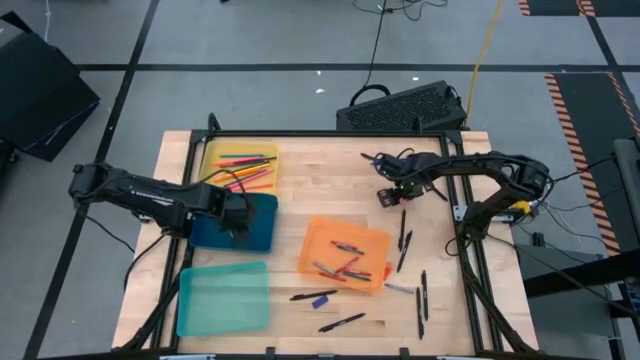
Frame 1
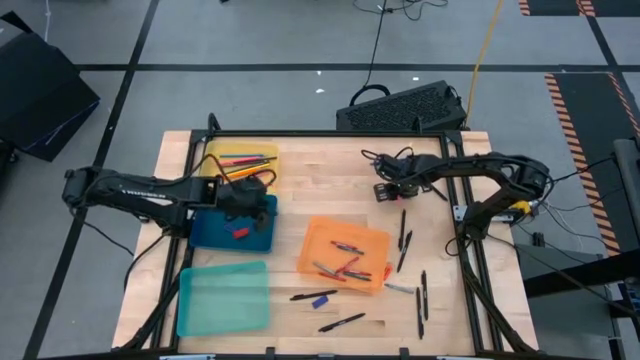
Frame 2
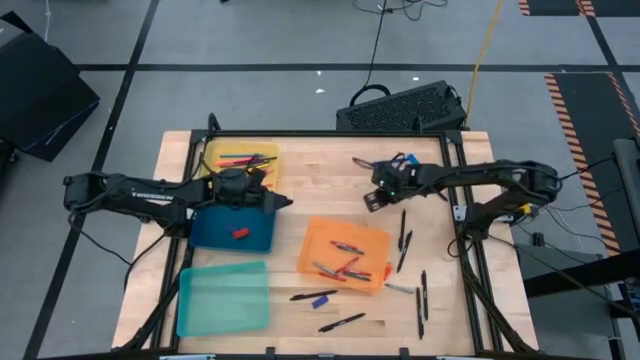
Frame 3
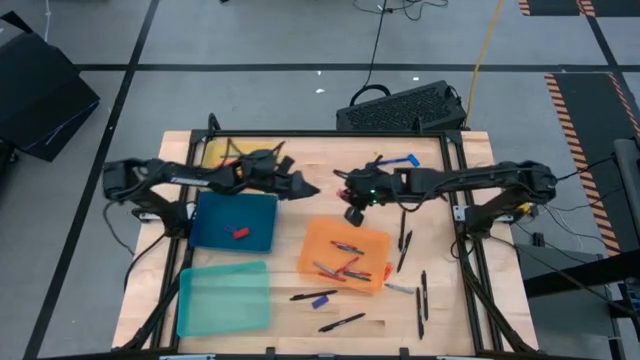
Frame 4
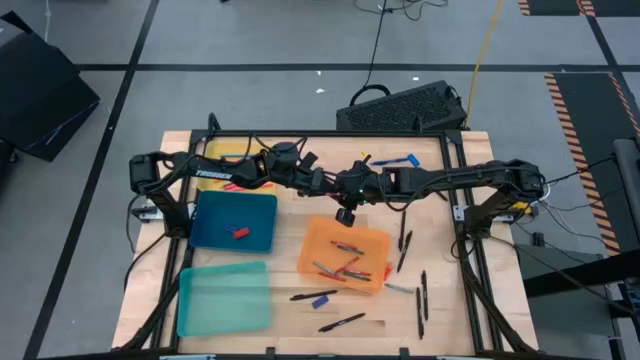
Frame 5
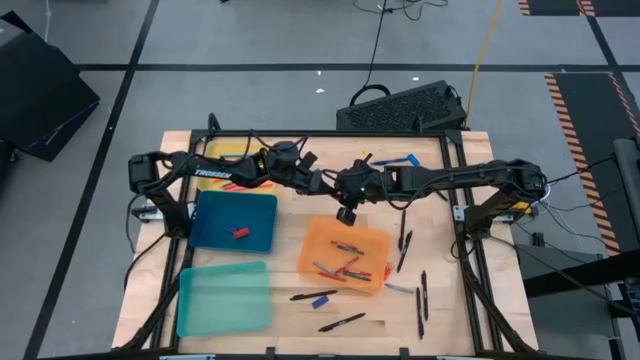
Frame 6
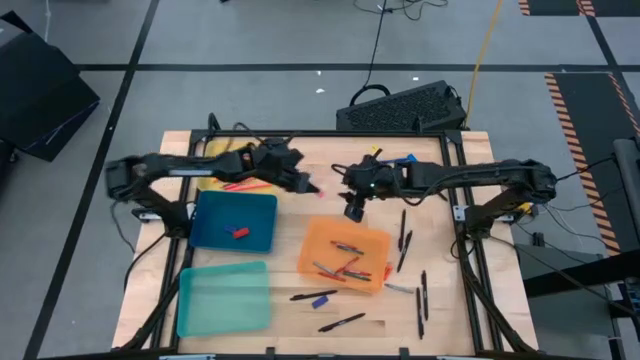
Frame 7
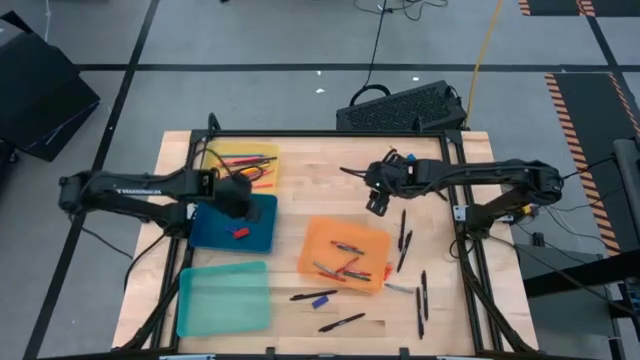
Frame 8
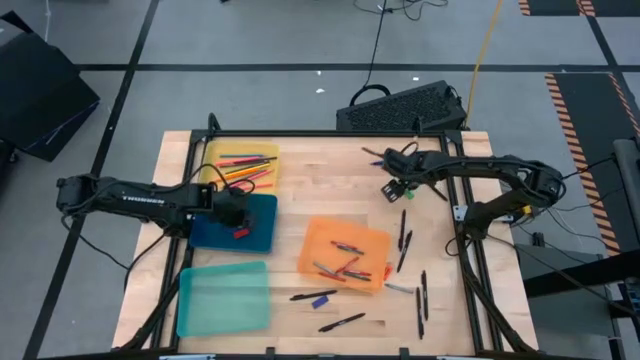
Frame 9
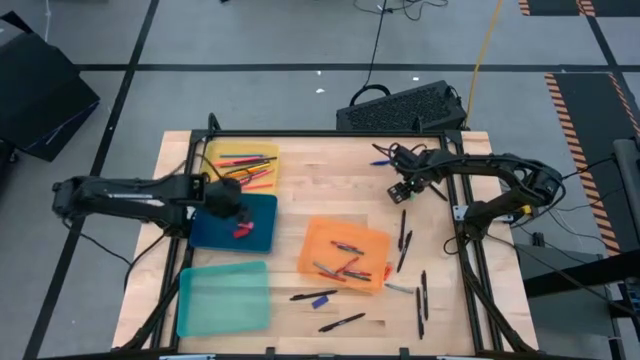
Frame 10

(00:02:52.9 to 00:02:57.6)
Task: Sort crayons/erasers/pens/pencils in bins
Put the pink eraser into the blue bin

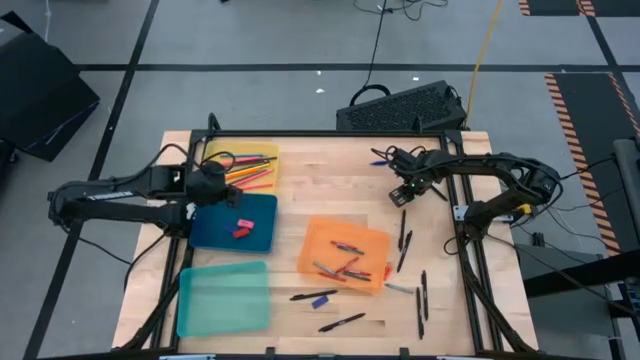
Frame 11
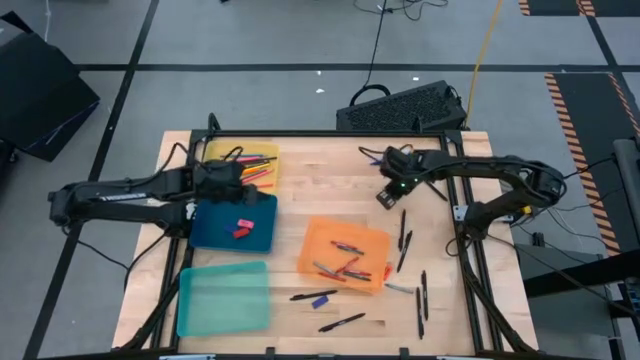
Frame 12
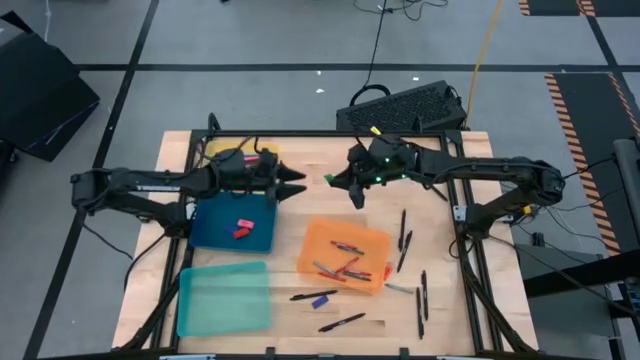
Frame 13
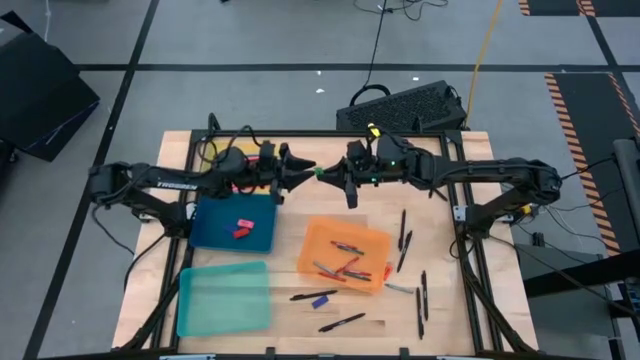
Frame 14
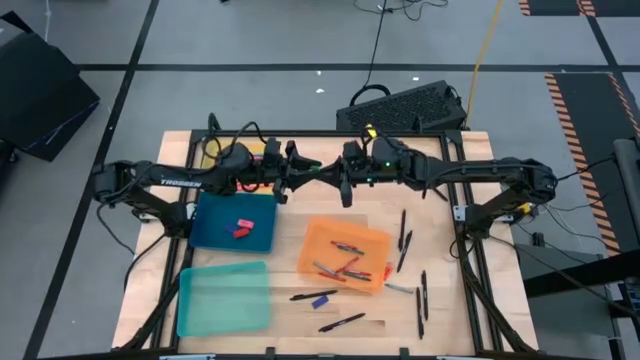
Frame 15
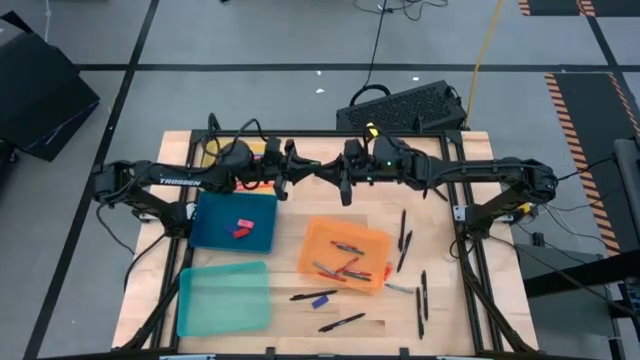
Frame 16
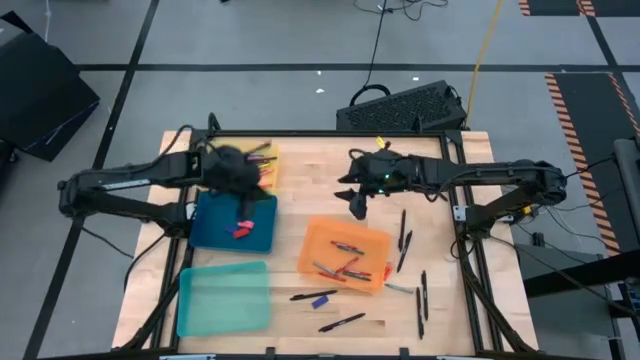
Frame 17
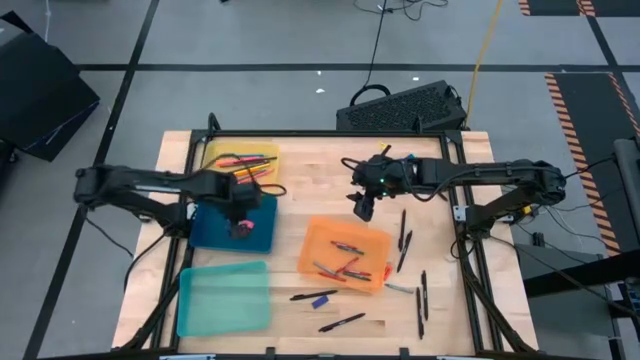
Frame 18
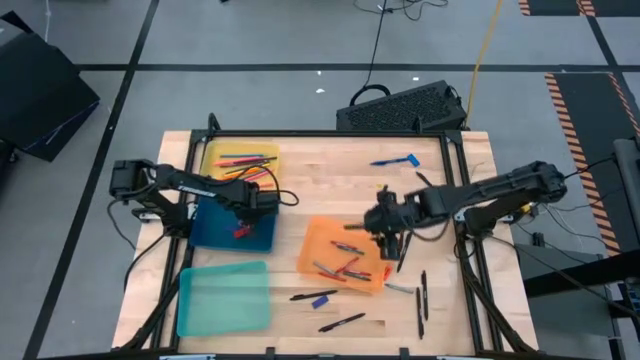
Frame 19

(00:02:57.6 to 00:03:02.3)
Put the green eraser into the blue bin

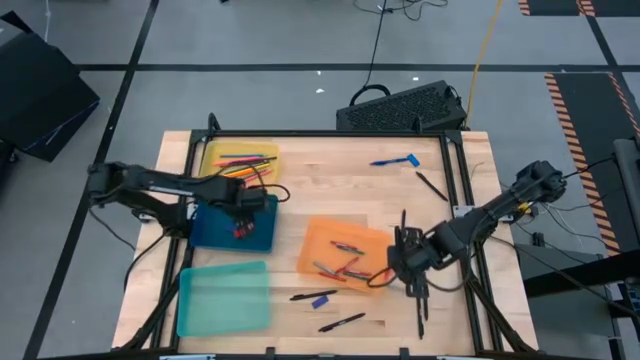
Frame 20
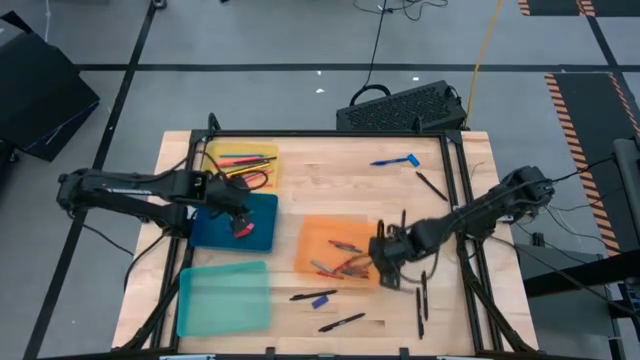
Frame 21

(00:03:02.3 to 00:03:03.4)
Adjust the orange bin

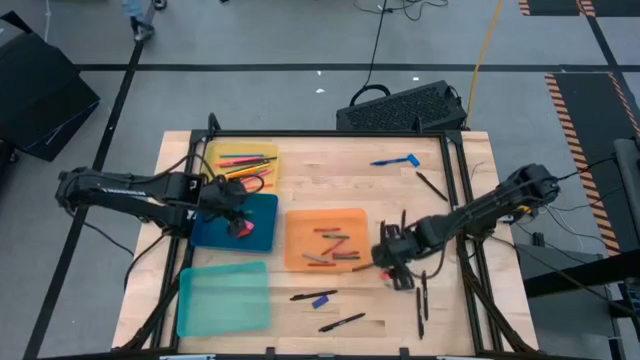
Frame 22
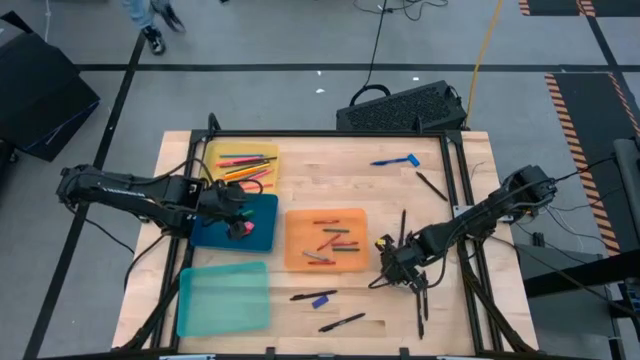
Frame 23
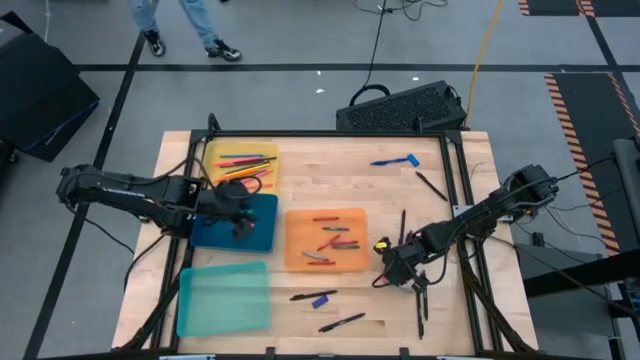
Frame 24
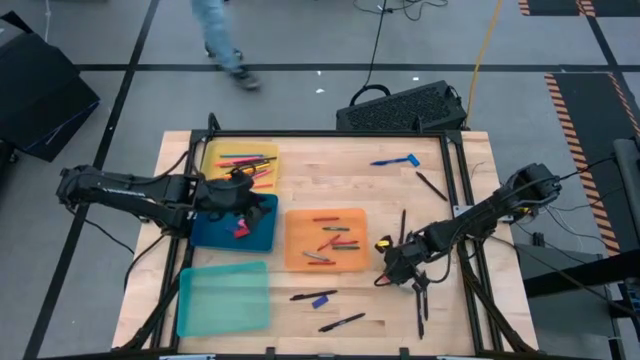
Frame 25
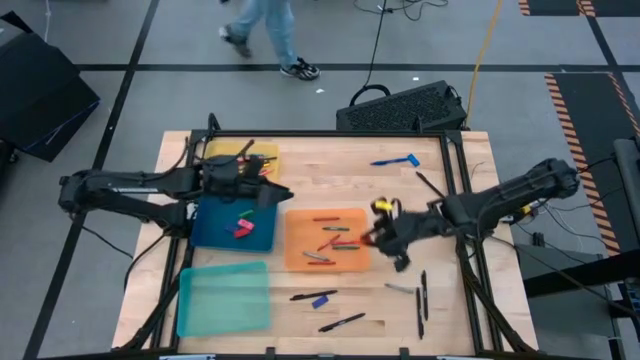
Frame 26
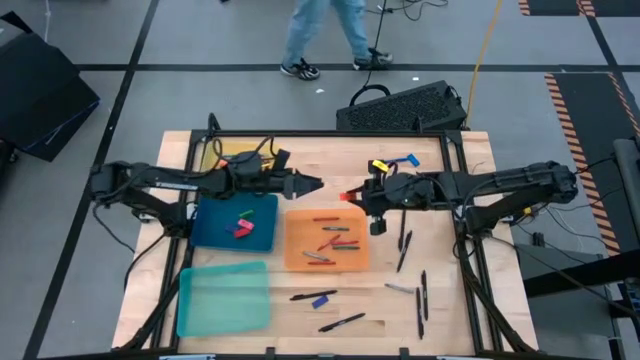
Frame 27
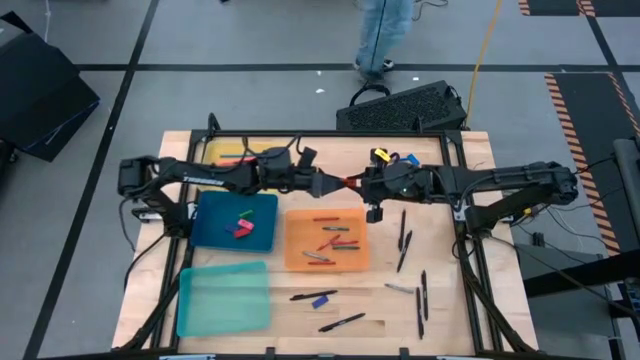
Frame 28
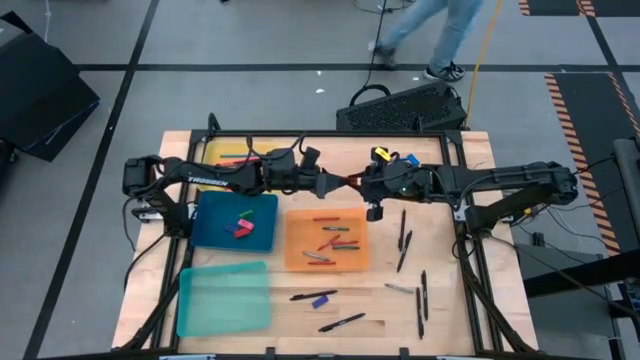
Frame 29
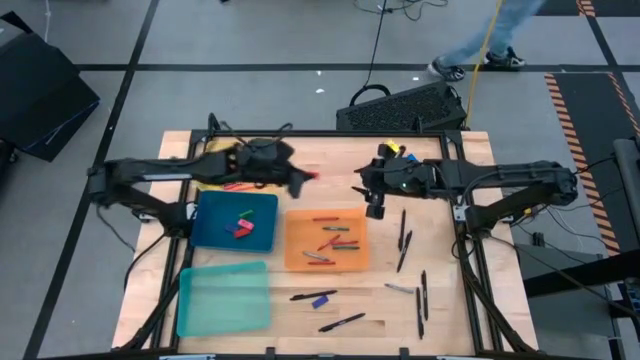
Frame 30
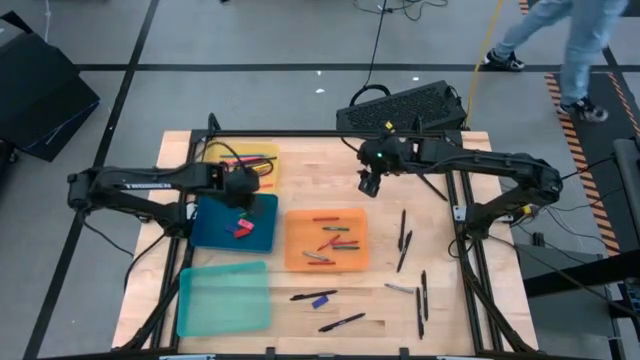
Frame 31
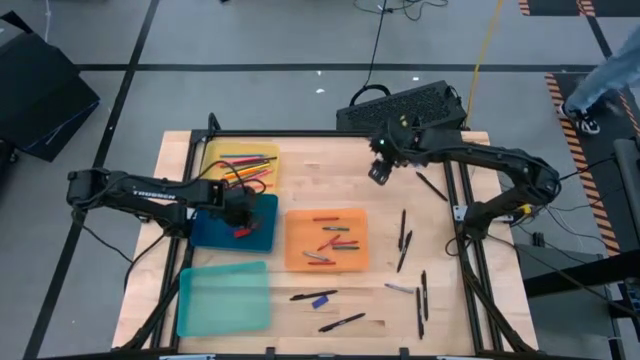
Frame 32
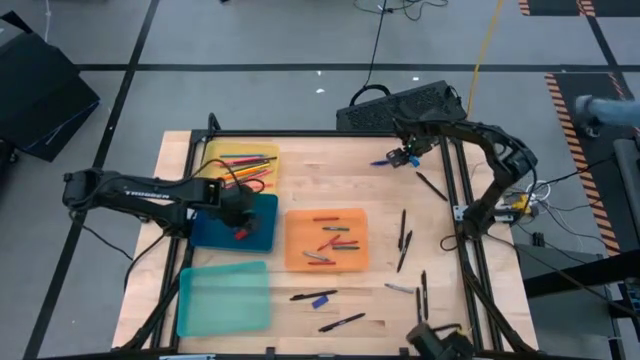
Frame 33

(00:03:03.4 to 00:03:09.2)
Put the orange eraser into the blue bin

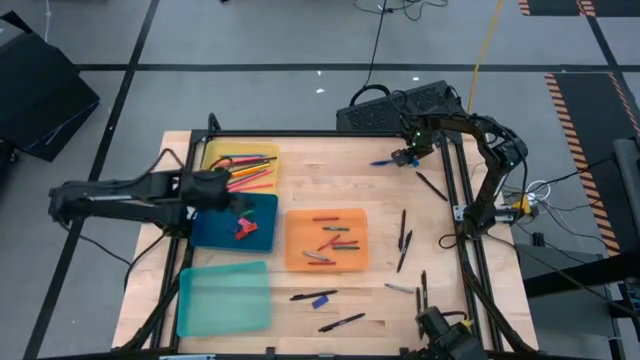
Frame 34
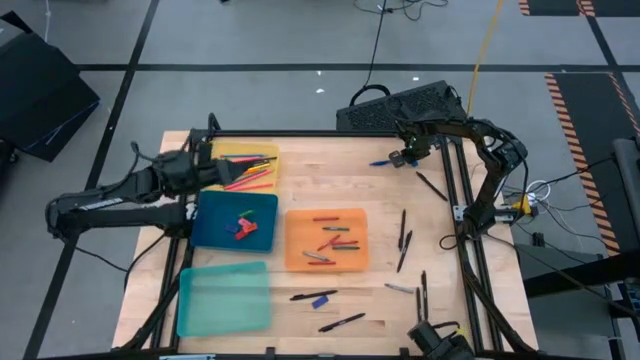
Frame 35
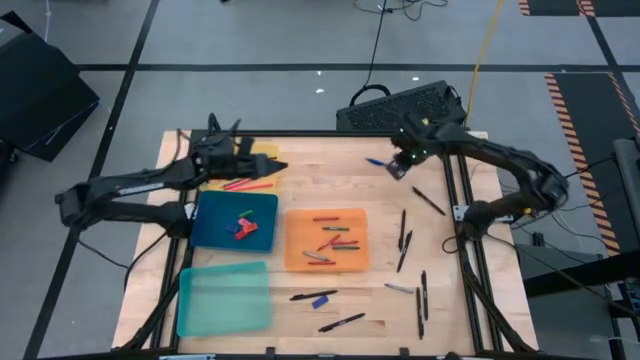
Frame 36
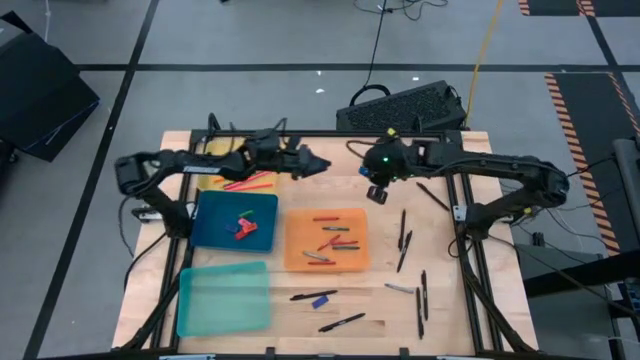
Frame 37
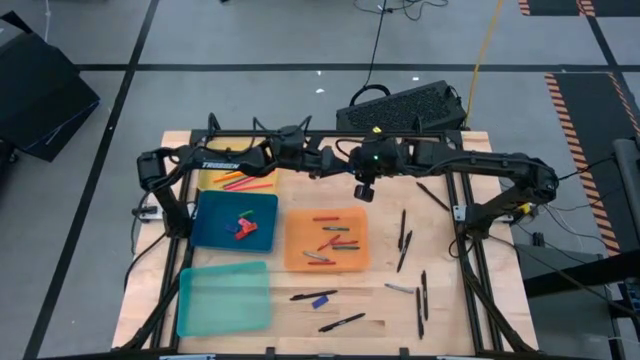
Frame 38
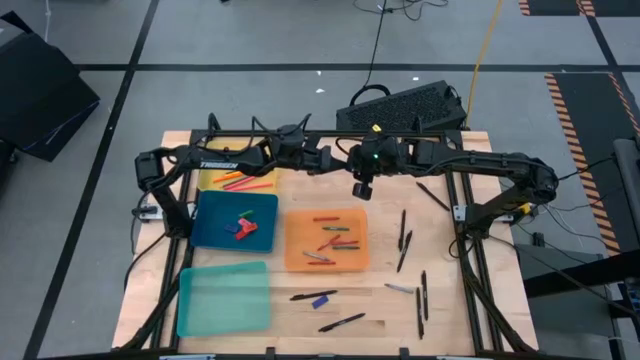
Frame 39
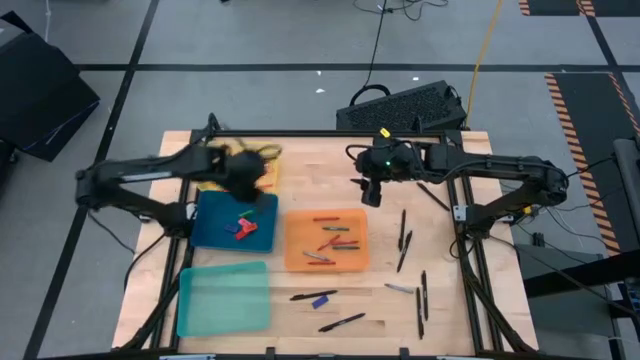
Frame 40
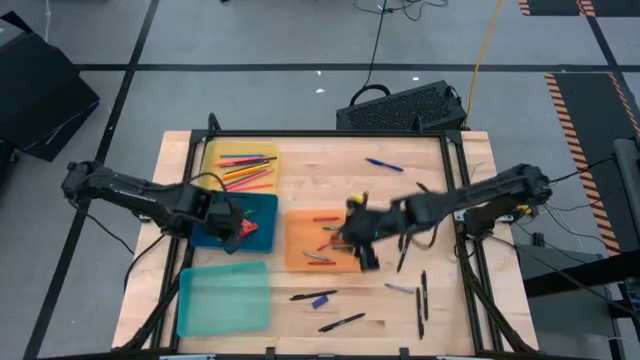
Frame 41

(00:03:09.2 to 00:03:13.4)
Put the blue eraser into the blue bin

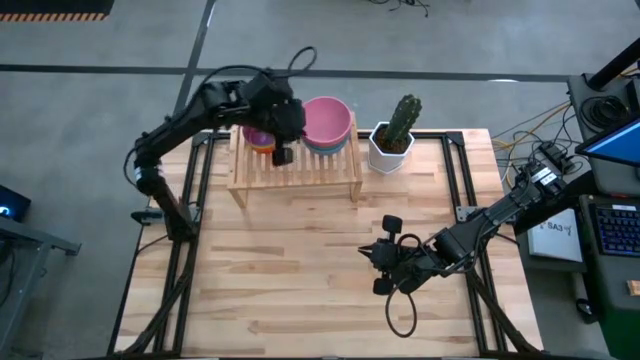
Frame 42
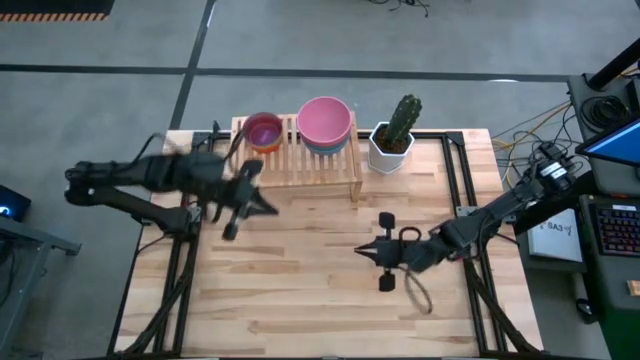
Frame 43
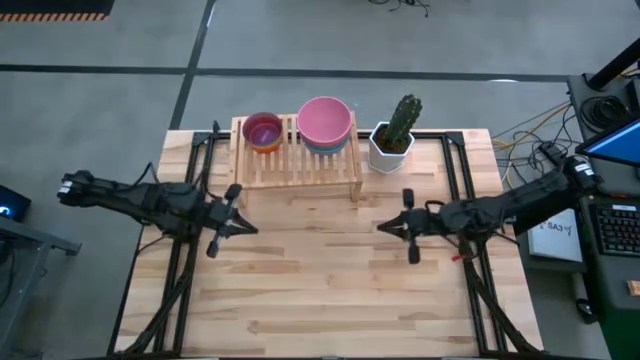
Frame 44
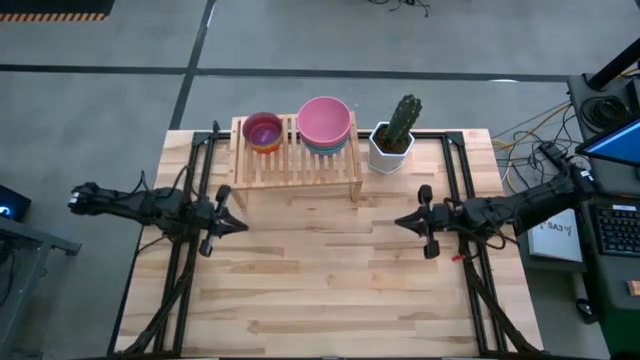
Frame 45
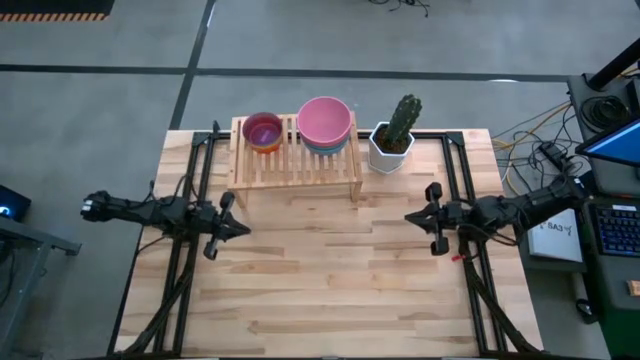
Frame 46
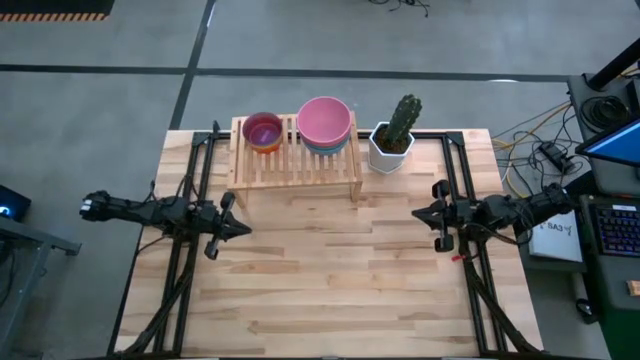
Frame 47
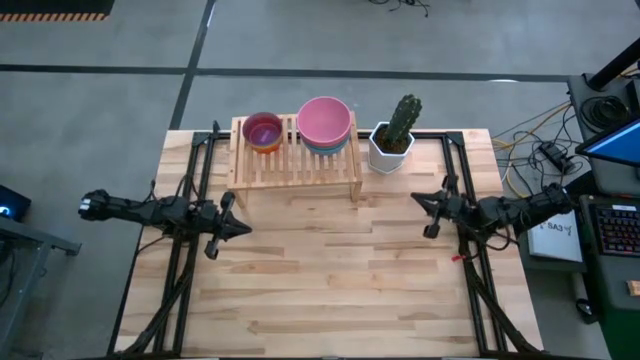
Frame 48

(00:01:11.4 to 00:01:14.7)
Task: Place and stack bowls onto a shelf
Return to Home Position
